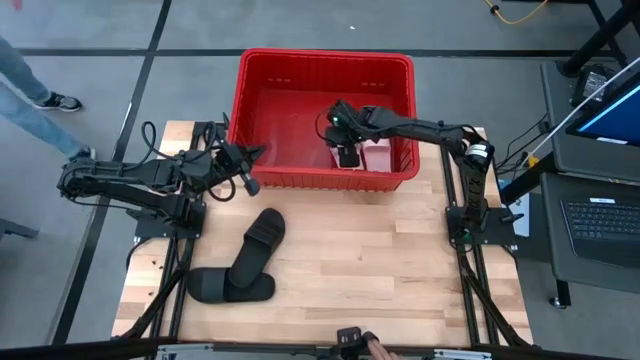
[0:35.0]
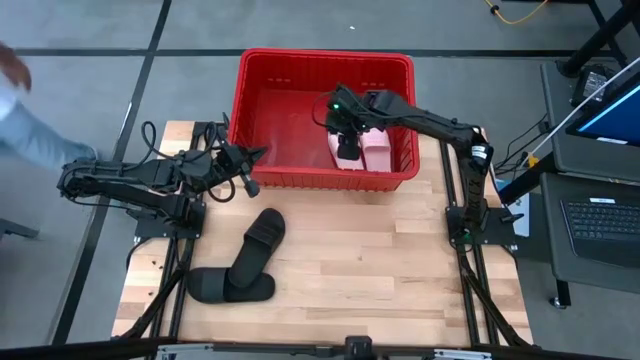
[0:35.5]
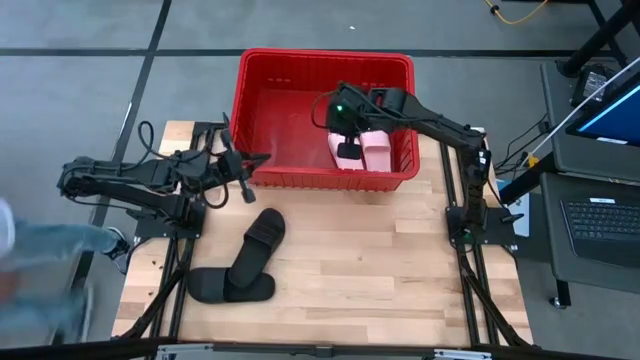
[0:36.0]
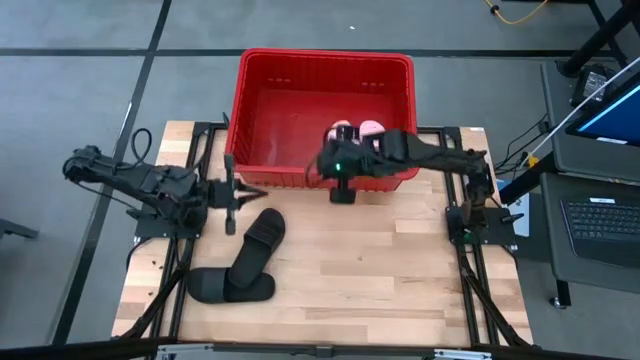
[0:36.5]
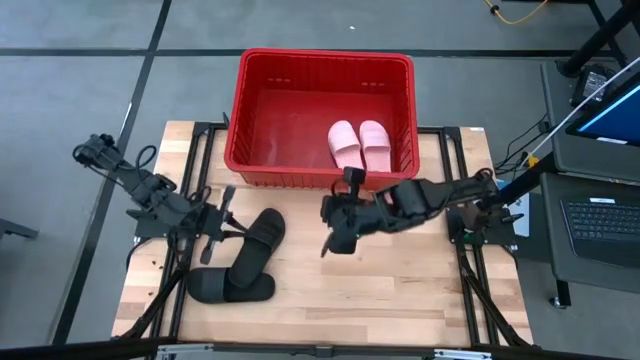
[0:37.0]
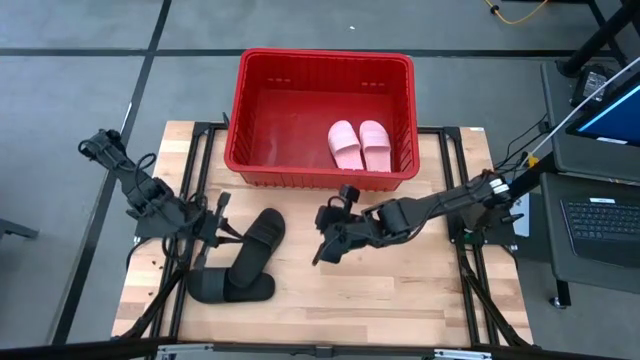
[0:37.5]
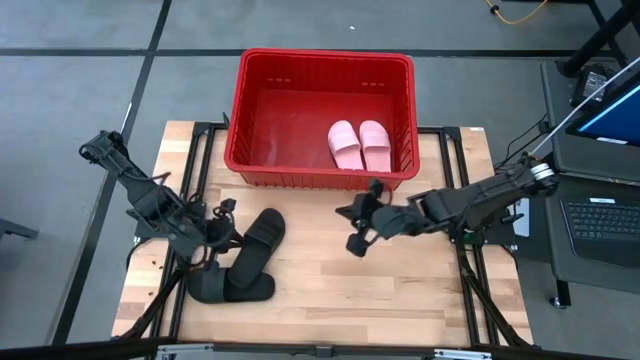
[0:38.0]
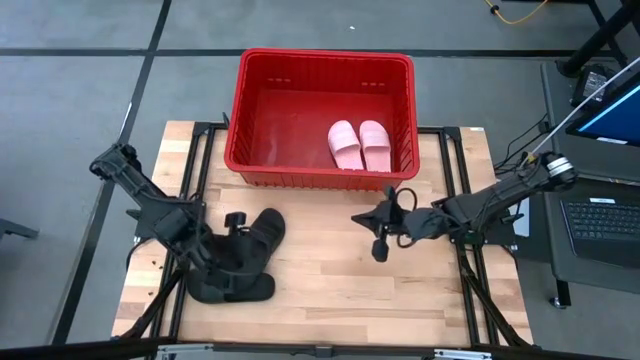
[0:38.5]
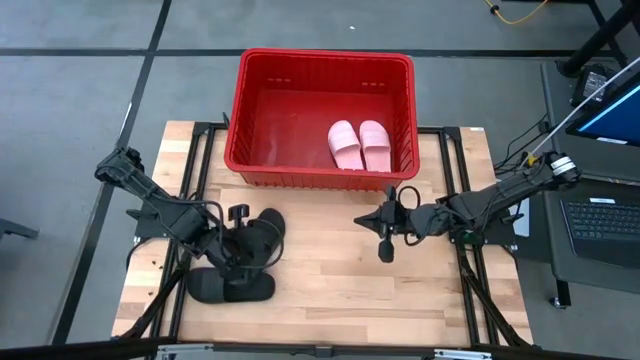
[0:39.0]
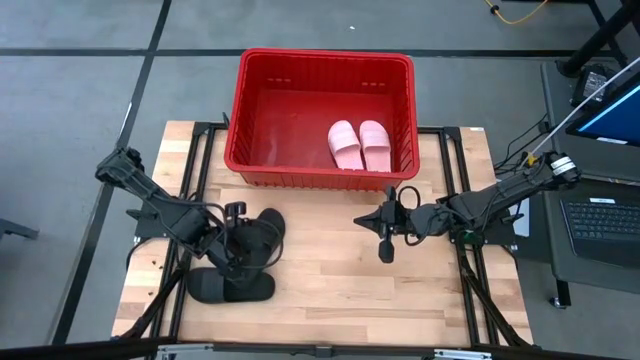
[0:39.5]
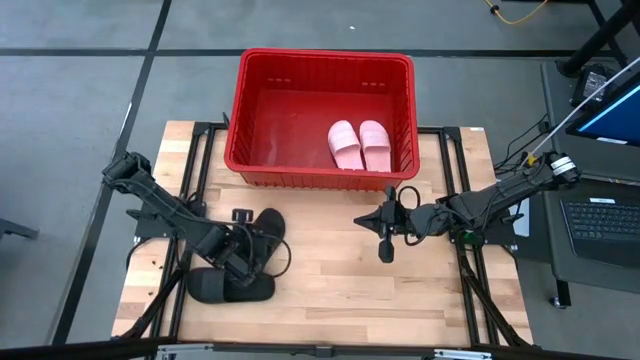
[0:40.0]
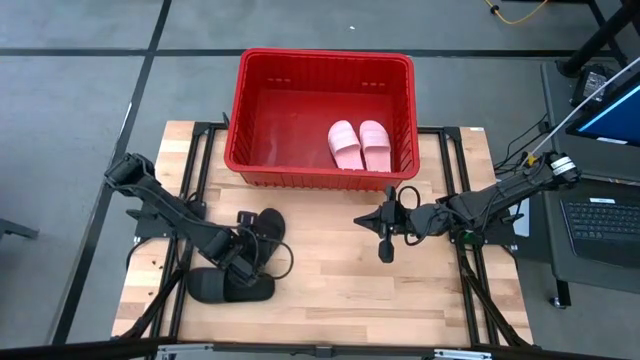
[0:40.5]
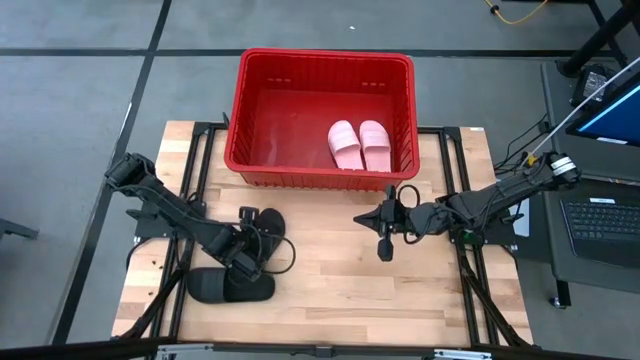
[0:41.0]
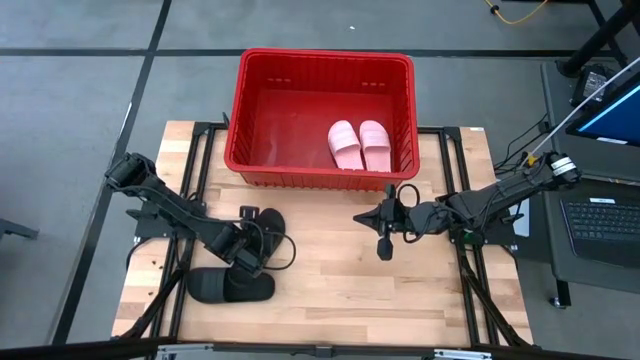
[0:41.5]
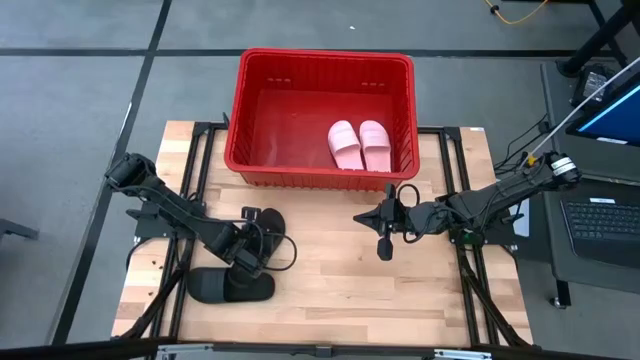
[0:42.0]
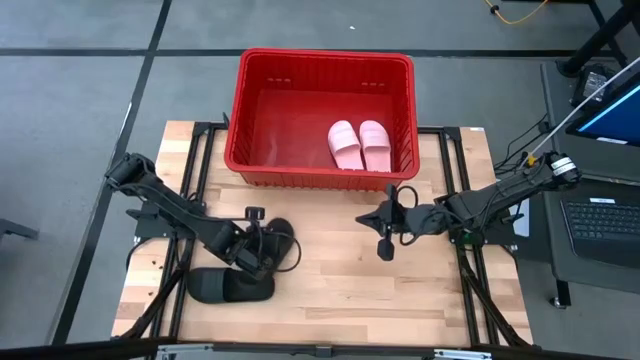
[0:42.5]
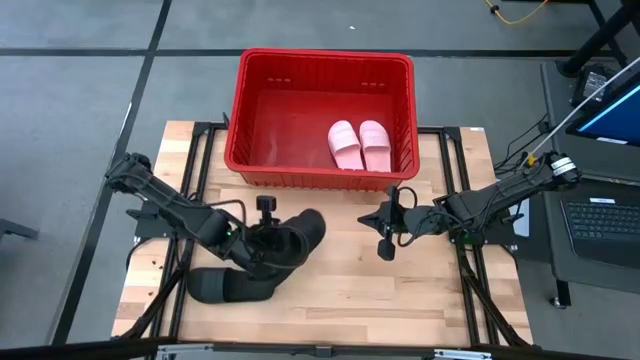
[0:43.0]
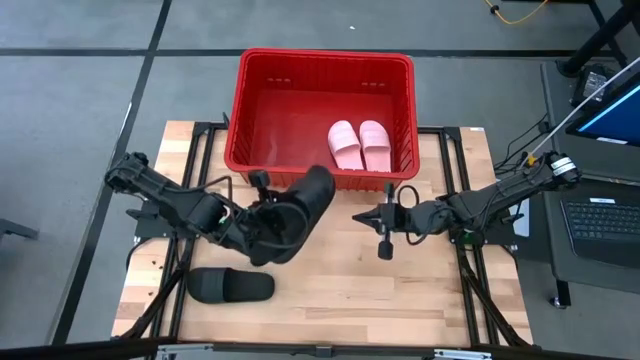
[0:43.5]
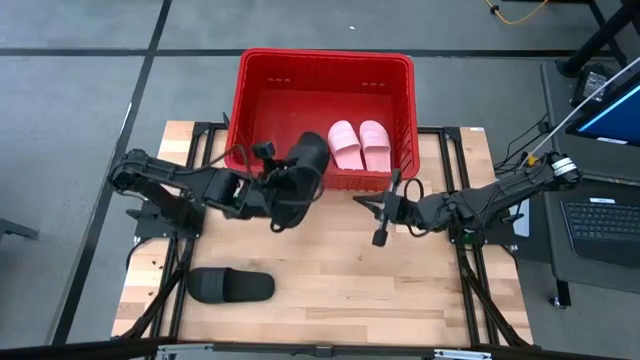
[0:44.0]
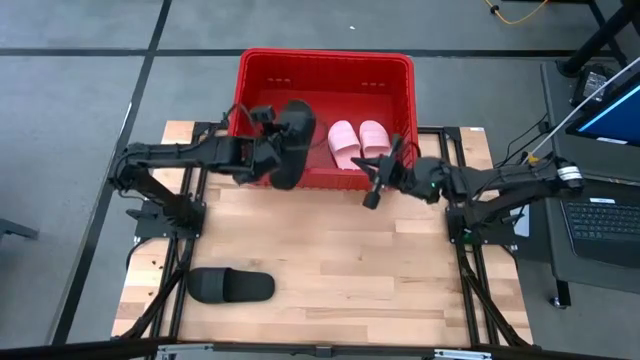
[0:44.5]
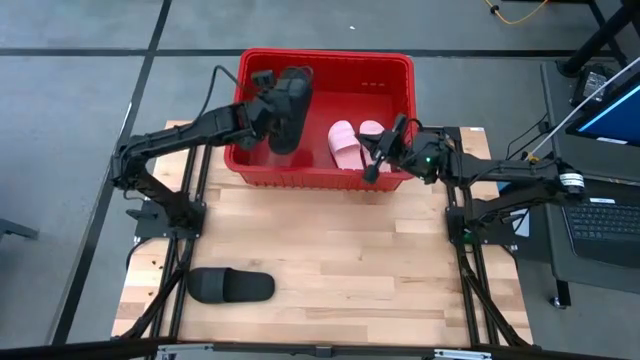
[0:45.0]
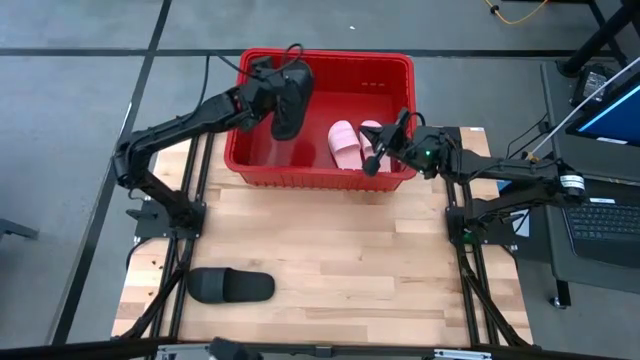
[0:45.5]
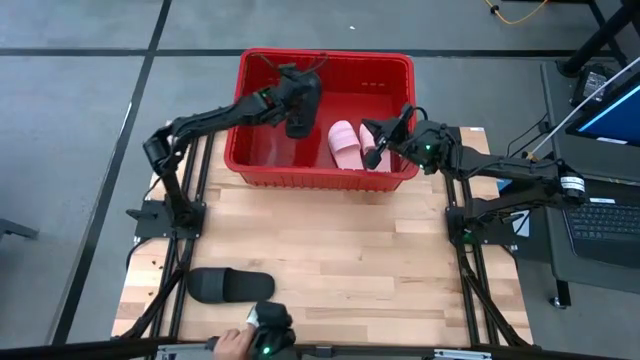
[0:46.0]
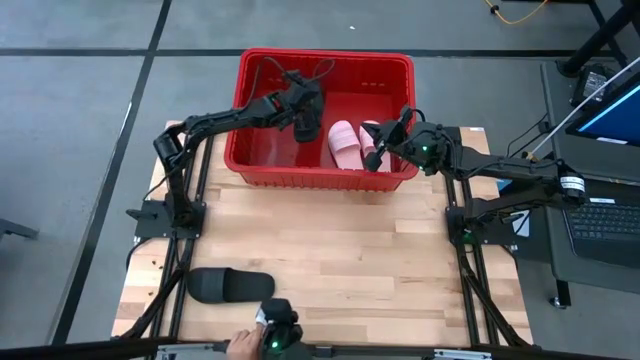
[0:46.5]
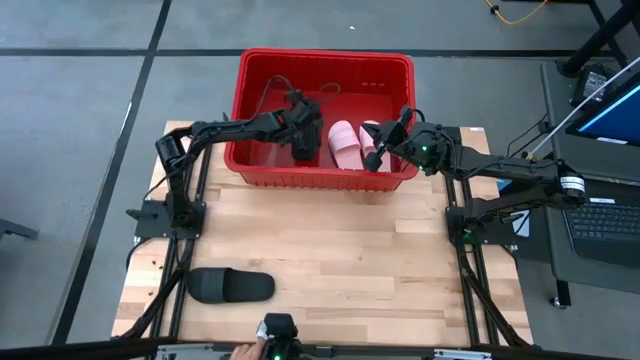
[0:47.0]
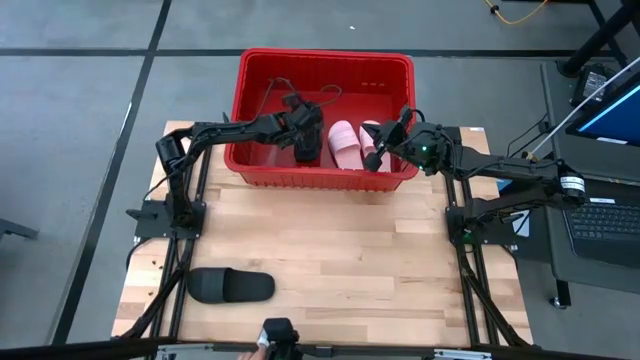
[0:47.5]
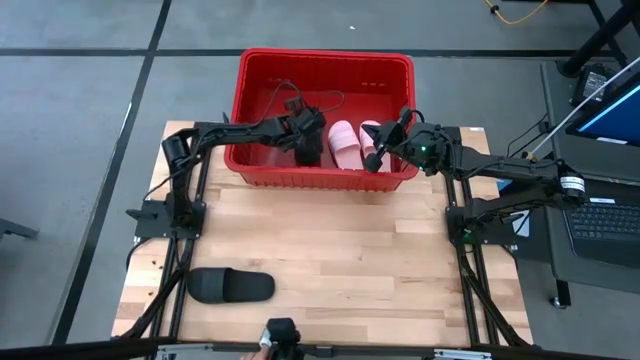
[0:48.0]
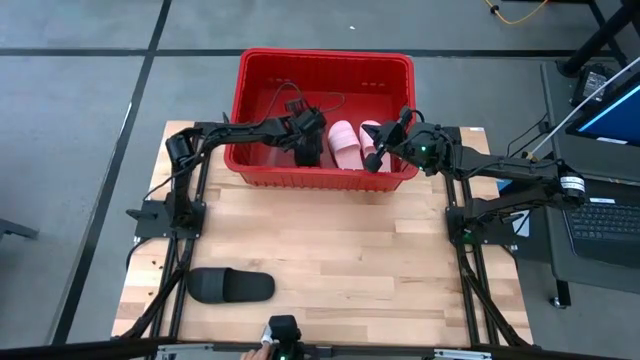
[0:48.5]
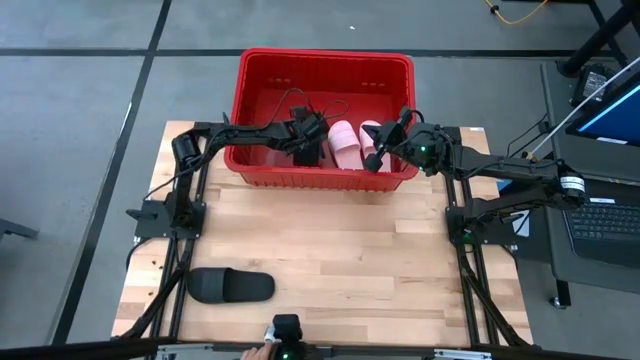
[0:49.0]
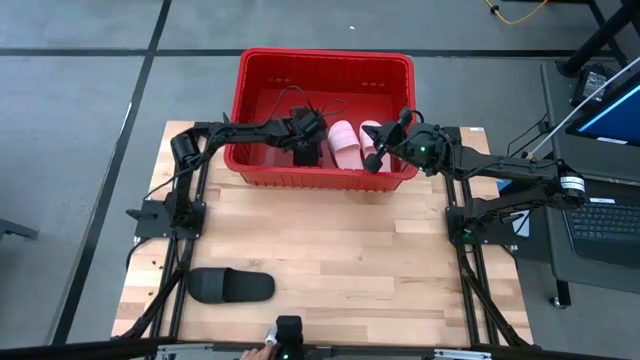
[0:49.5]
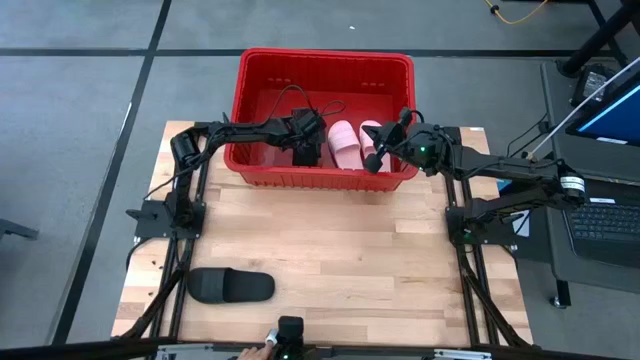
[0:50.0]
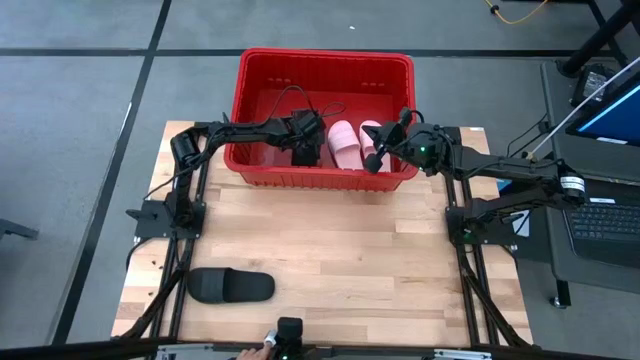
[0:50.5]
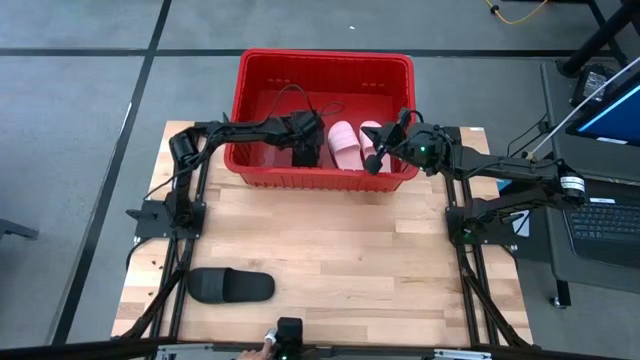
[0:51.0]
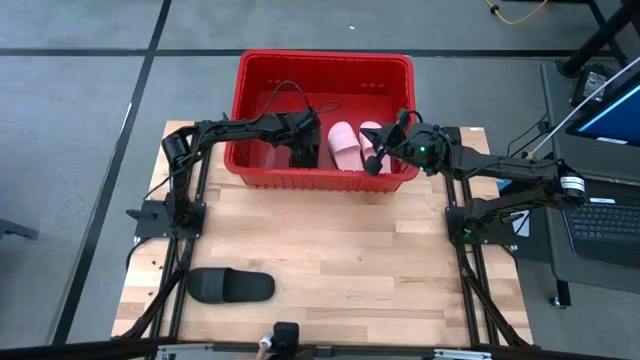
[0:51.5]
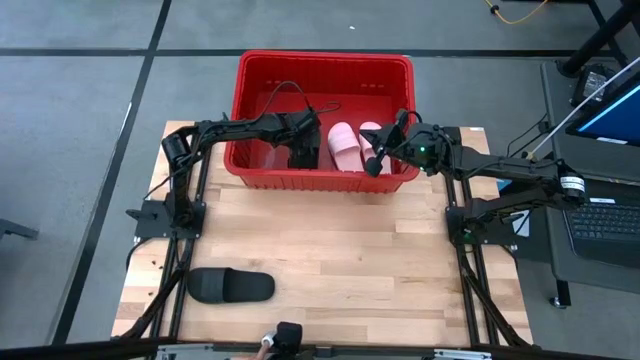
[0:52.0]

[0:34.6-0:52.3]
Task: Pick and place slides into bin
Put the top black slide into the red container

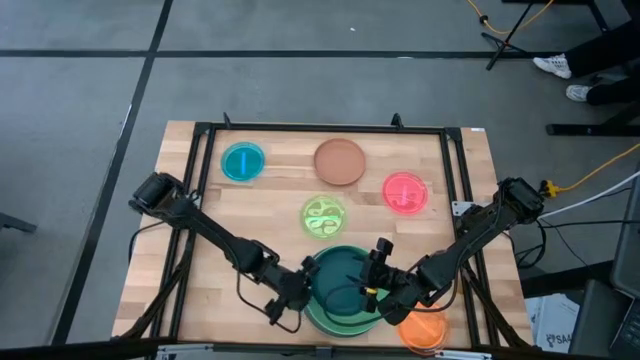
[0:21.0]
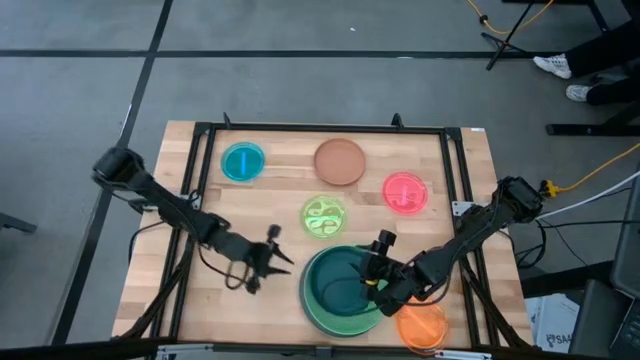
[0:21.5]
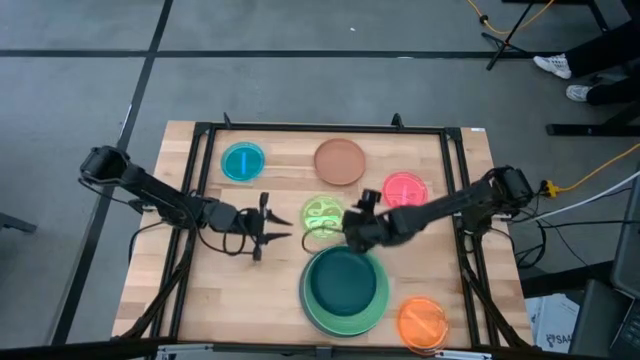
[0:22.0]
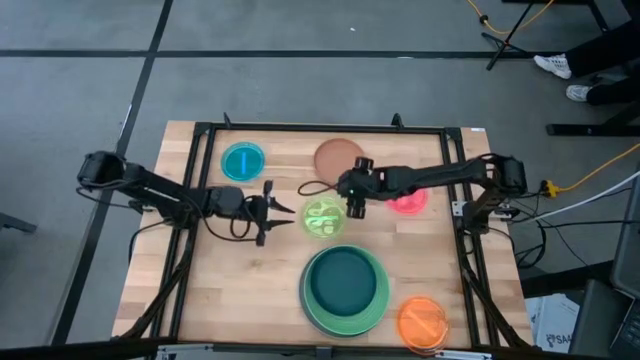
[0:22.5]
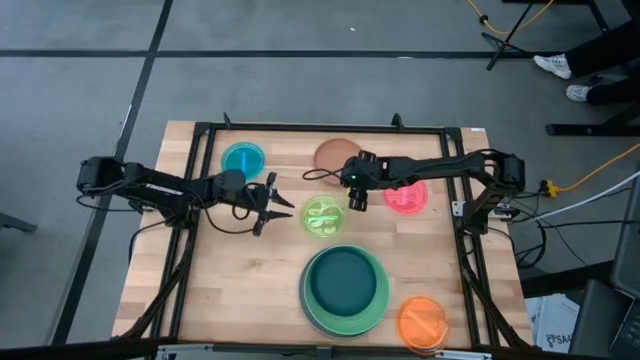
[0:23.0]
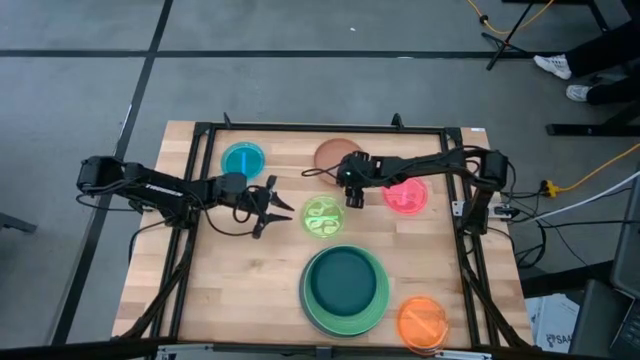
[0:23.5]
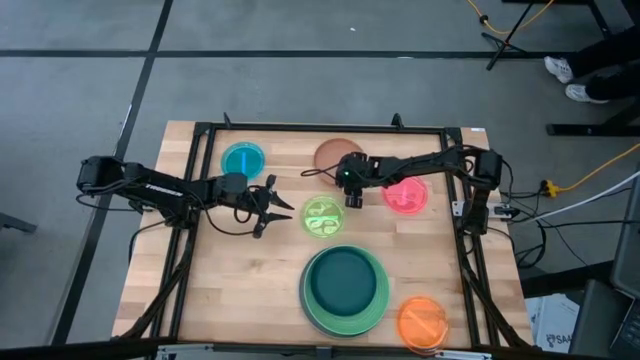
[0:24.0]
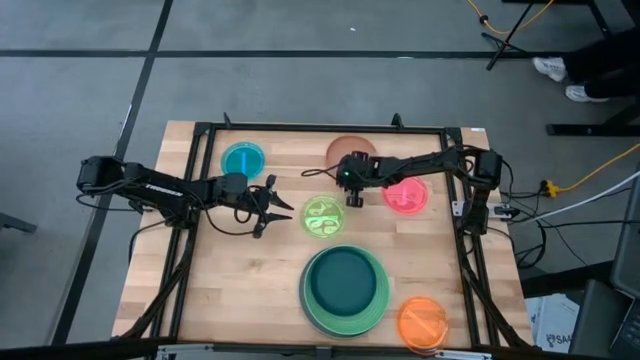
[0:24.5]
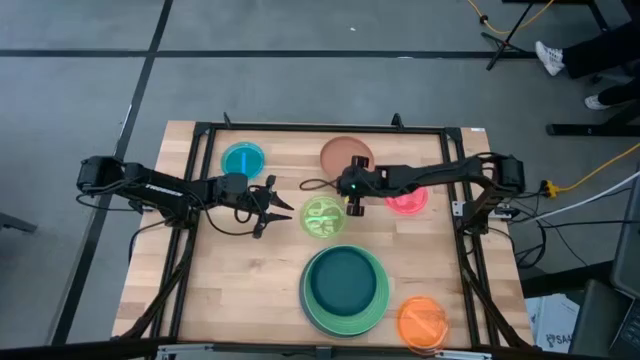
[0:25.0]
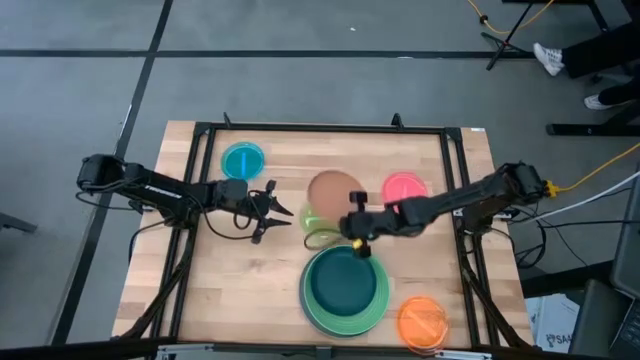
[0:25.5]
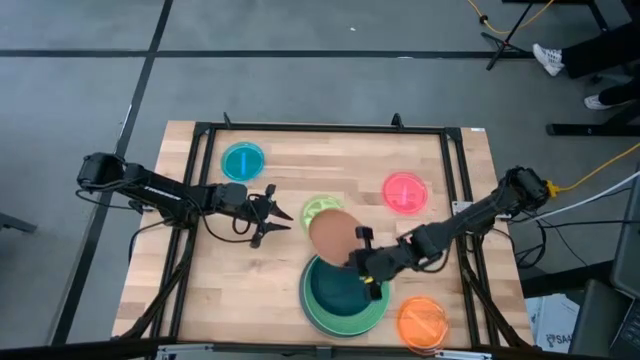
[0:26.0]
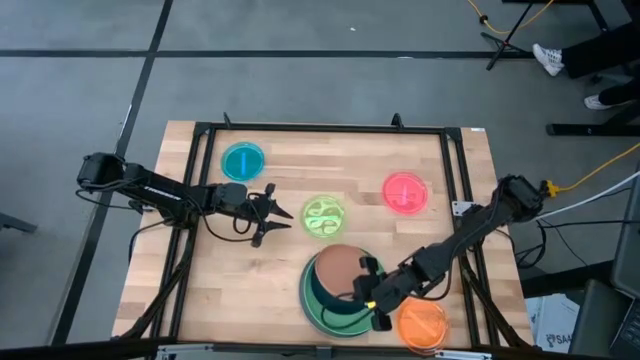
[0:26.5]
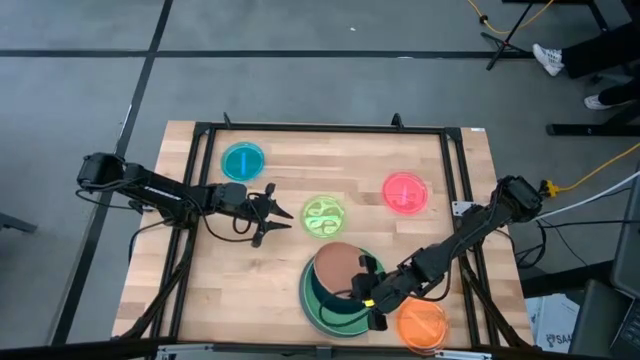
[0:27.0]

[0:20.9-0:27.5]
Task: Stack plastic plates
Stack the brown plate on top of the dark green plate
